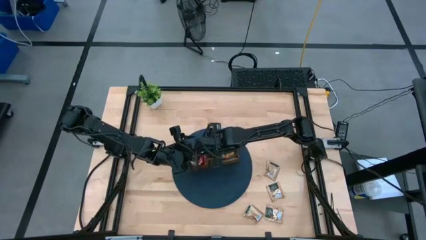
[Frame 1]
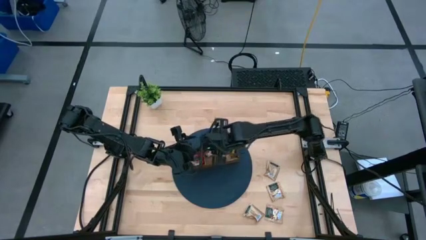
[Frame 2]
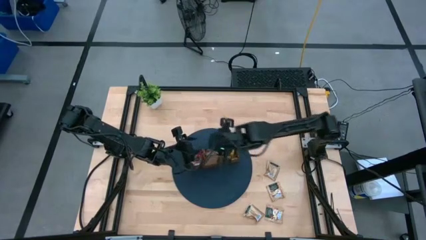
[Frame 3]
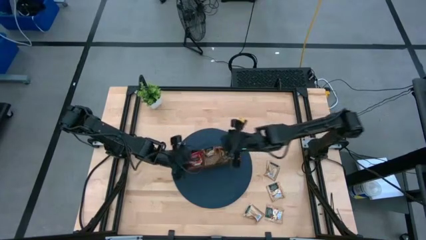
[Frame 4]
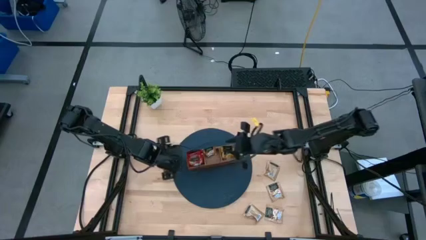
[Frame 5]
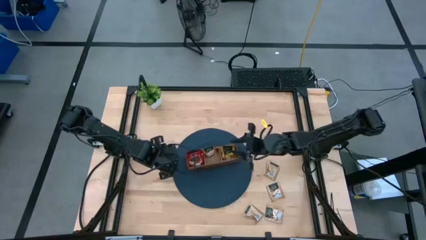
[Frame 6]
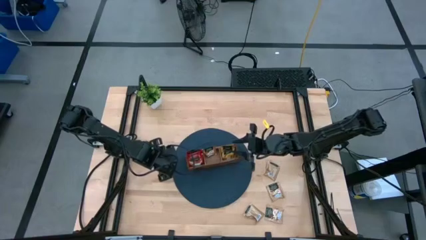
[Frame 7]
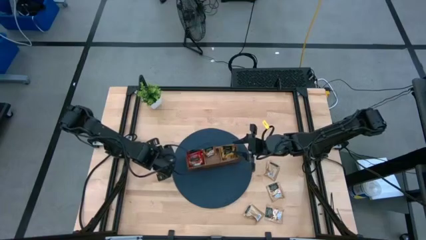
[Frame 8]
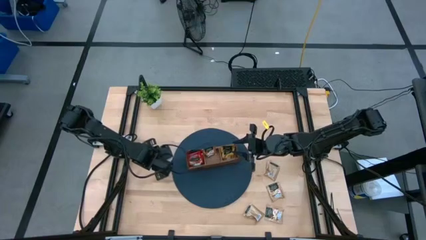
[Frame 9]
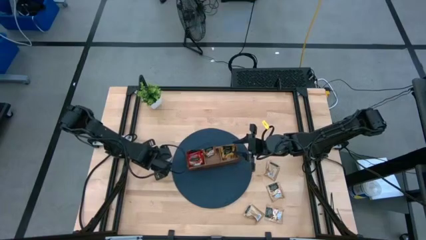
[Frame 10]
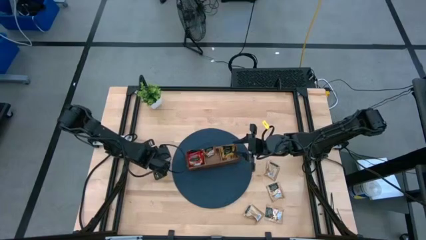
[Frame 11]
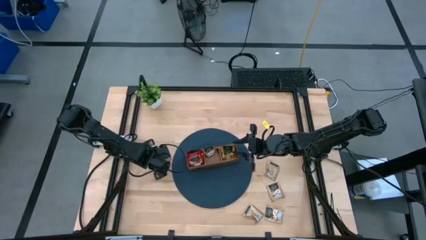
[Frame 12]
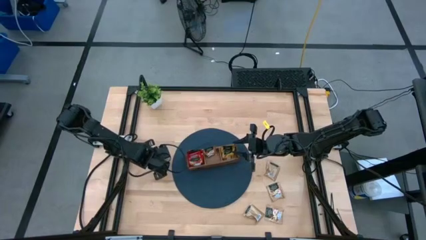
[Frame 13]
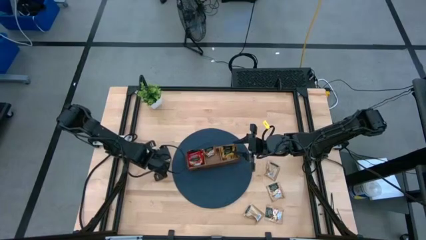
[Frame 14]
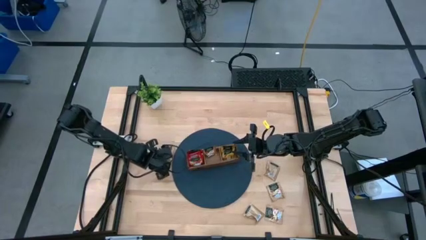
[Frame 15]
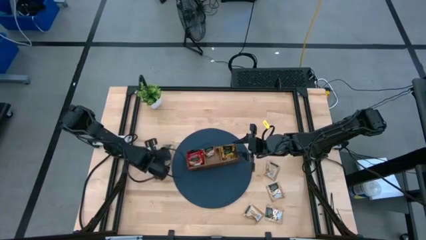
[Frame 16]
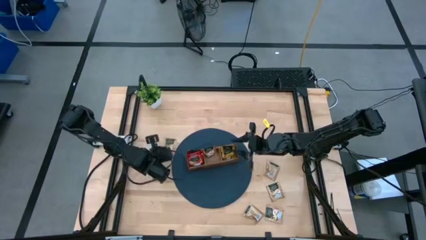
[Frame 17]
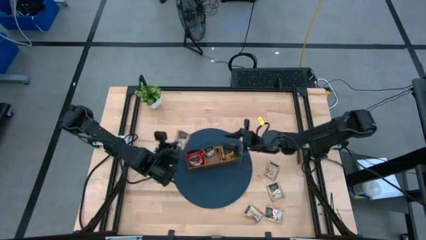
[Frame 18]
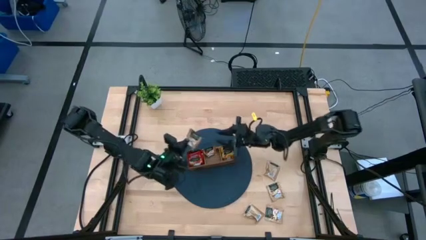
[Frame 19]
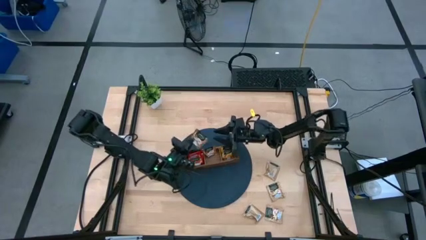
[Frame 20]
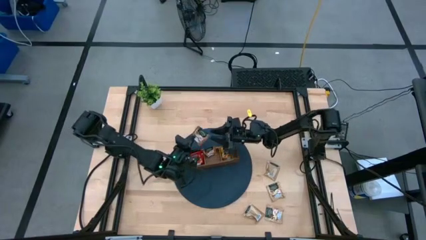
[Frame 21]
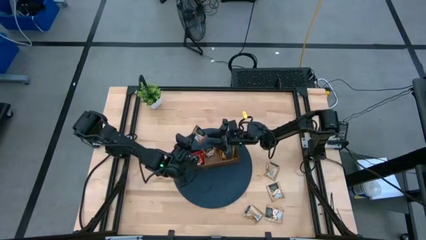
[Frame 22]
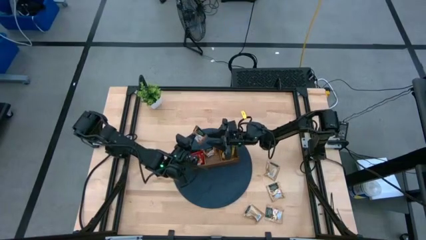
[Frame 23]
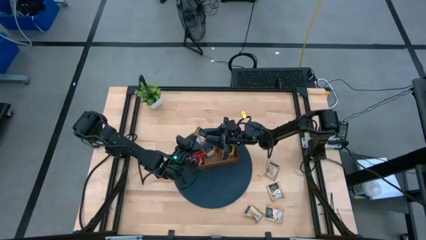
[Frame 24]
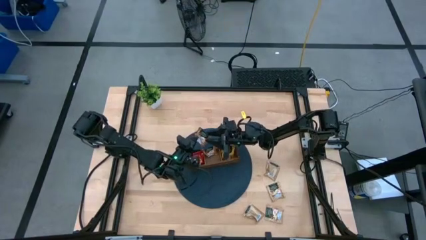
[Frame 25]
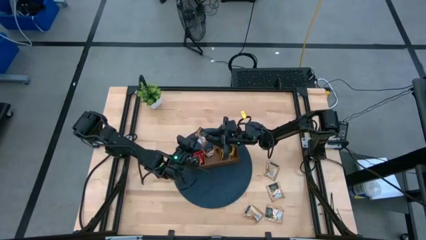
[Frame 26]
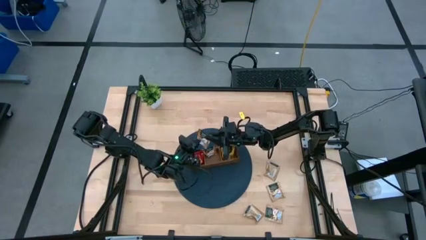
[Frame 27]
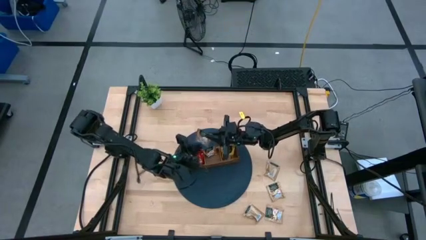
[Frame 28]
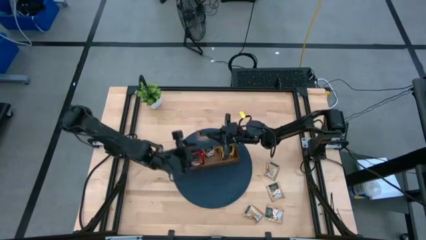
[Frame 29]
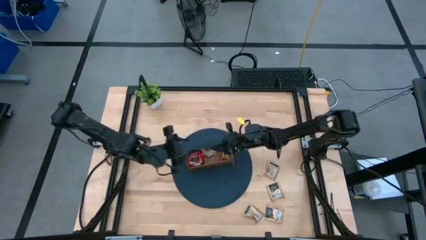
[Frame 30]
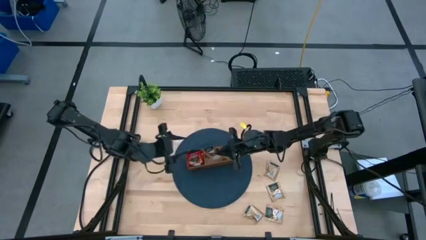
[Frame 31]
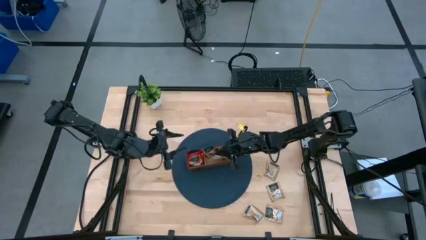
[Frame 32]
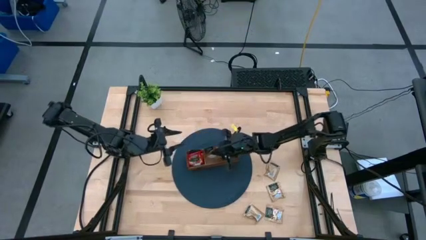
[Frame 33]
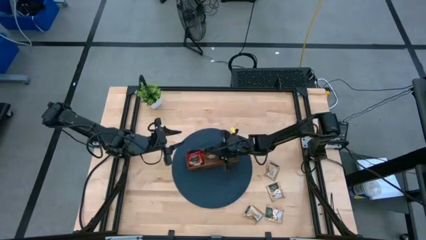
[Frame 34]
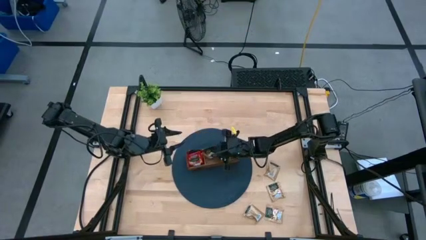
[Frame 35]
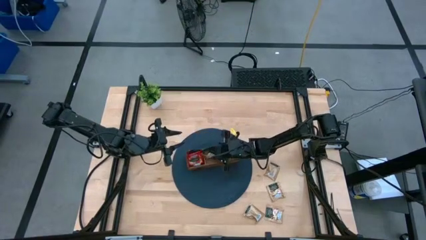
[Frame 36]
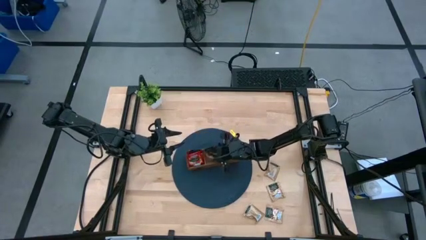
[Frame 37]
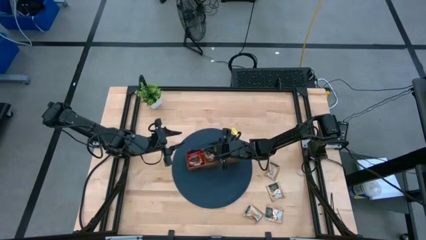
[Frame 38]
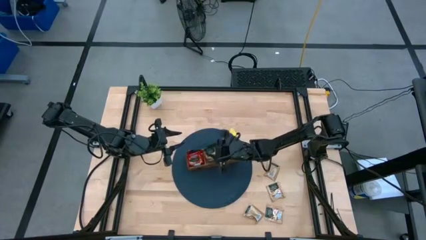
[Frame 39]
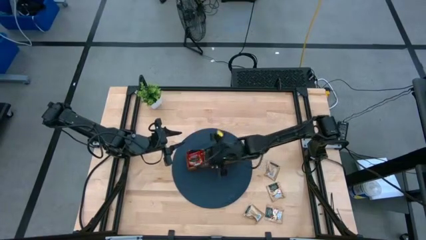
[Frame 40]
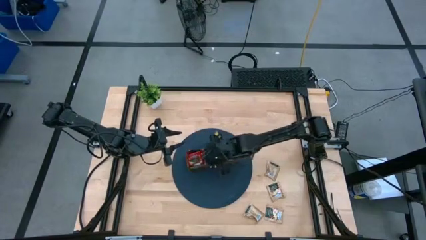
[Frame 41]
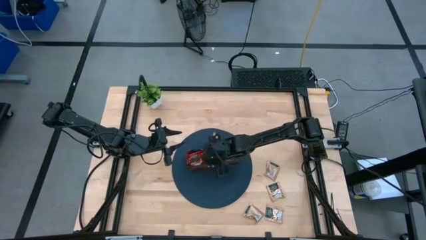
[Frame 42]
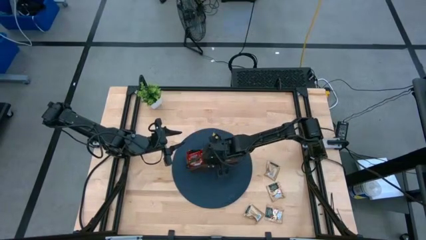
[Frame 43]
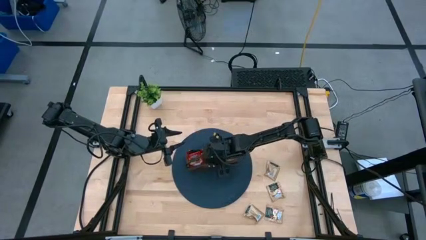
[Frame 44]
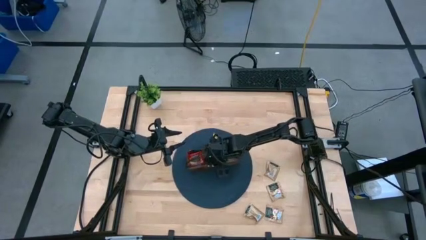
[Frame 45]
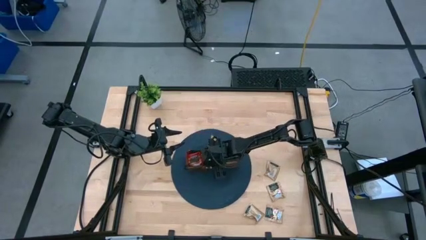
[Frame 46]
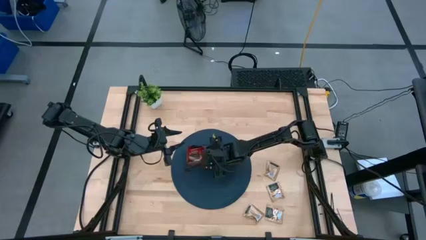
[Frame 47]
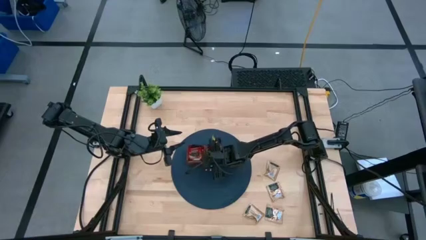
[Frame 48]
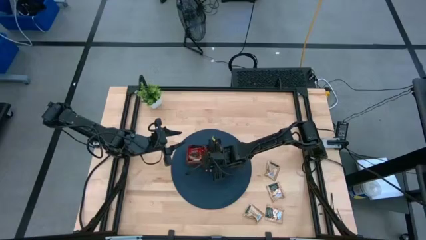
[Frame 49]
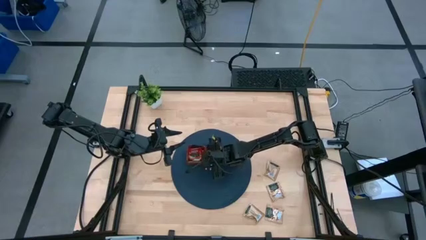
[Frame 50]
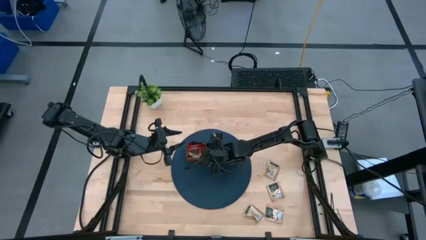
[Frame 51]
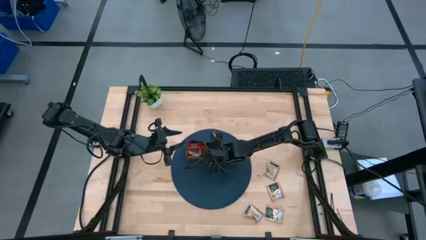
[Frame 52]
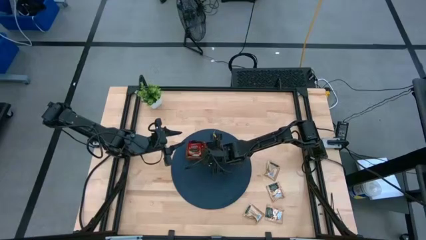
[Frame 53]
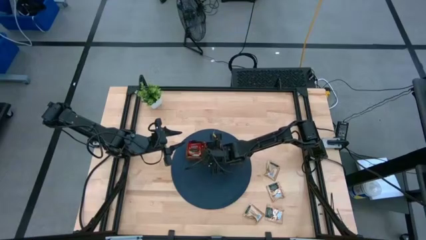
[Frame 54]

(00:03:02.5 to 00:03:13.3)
Task: Pick & Place Tea
Put the brown tea bag into the middle section of the wooden organizer
